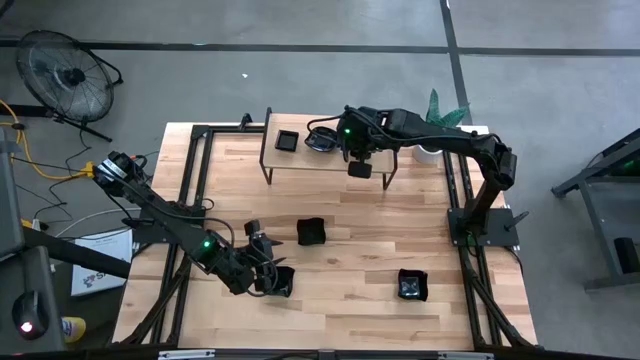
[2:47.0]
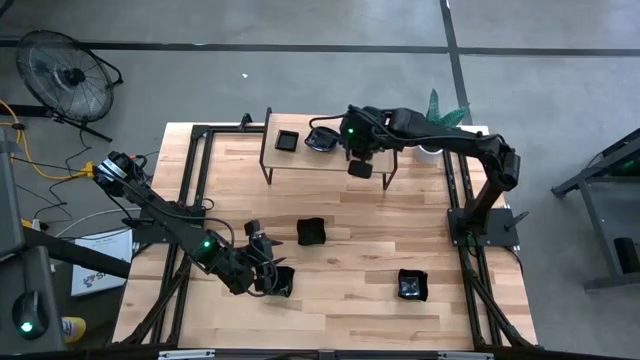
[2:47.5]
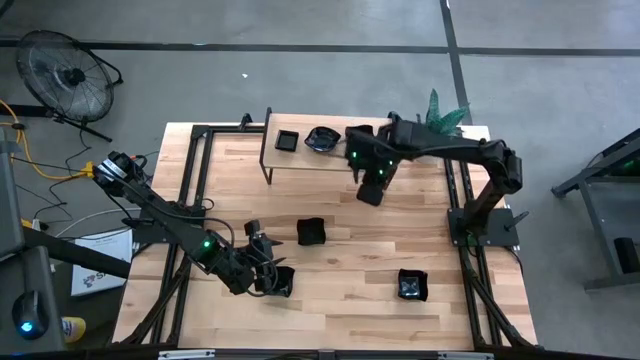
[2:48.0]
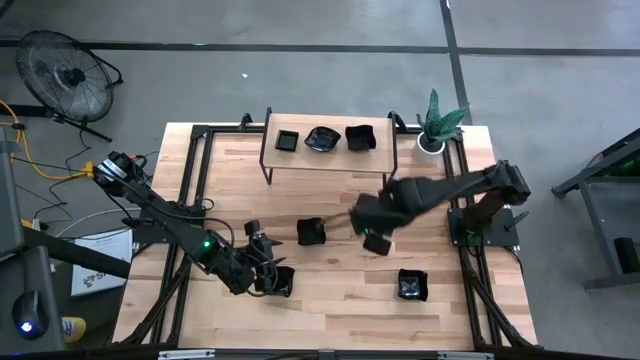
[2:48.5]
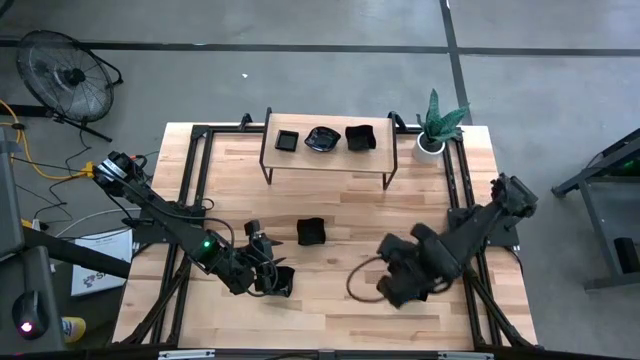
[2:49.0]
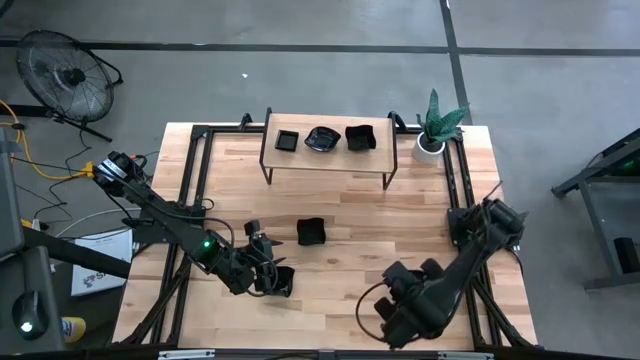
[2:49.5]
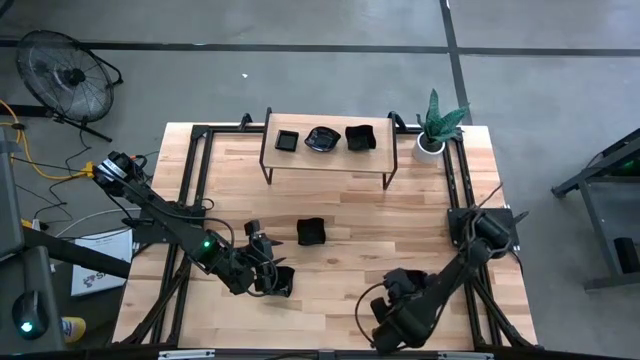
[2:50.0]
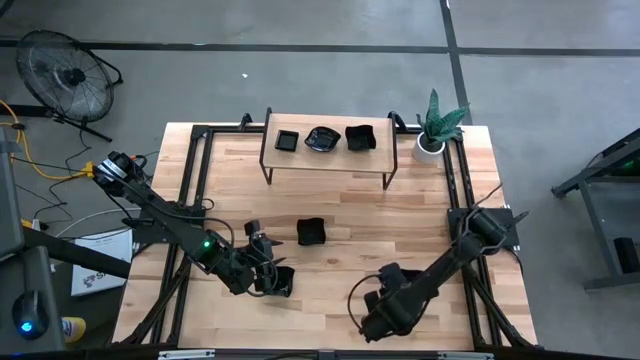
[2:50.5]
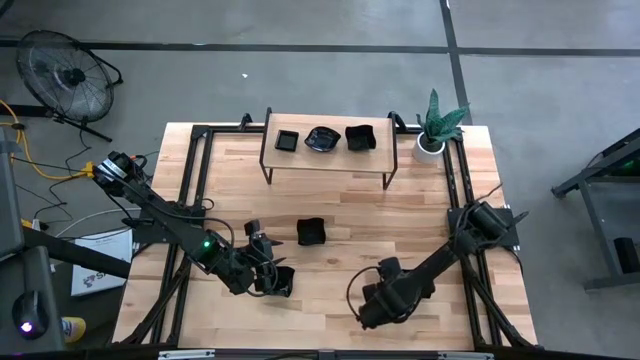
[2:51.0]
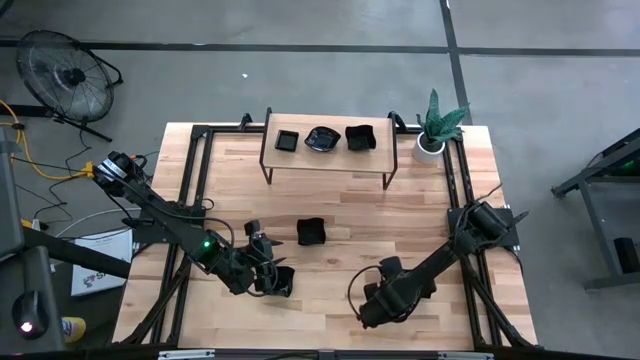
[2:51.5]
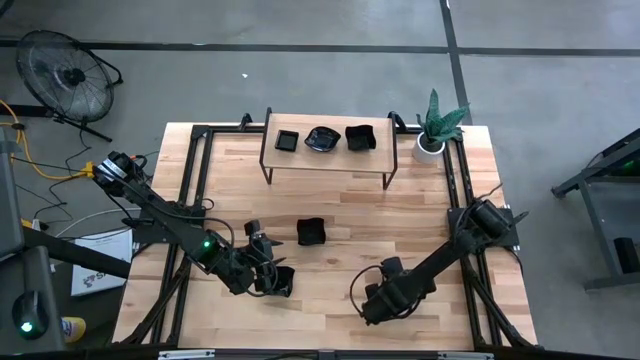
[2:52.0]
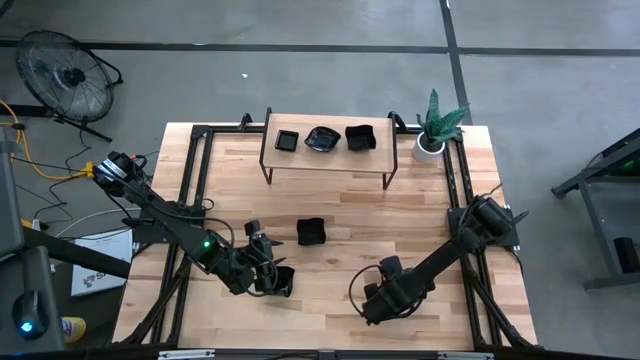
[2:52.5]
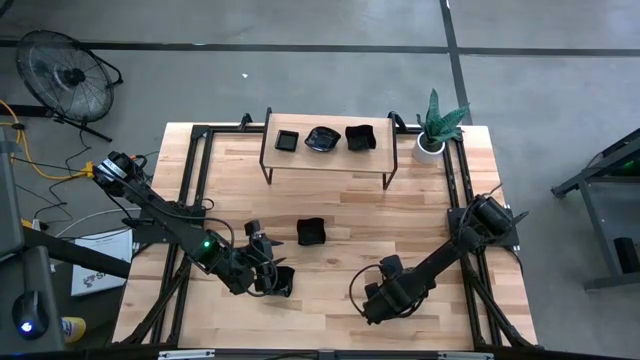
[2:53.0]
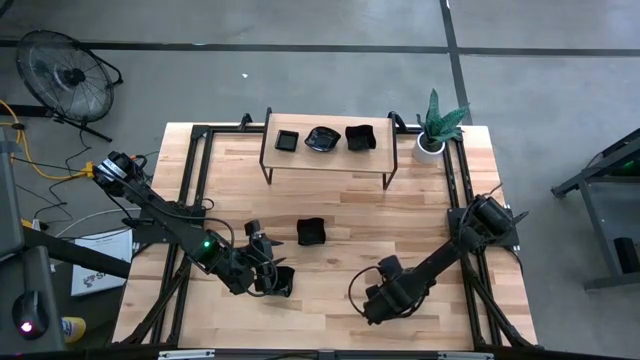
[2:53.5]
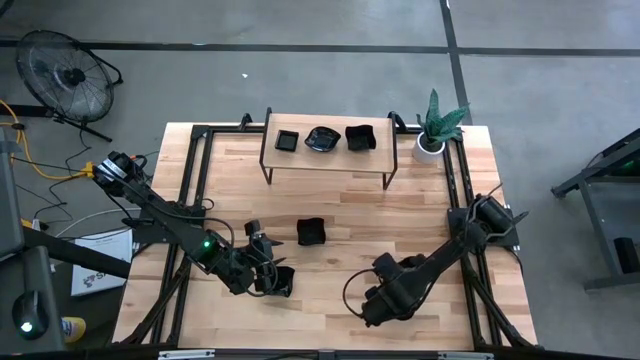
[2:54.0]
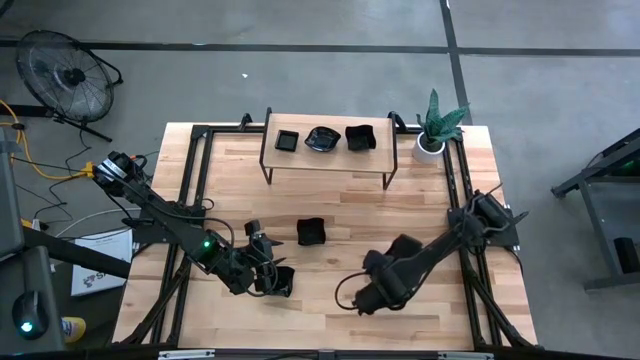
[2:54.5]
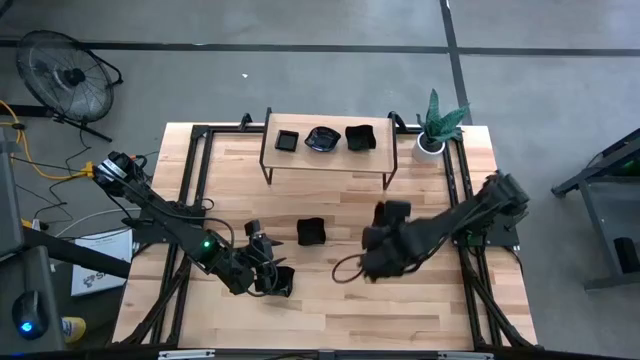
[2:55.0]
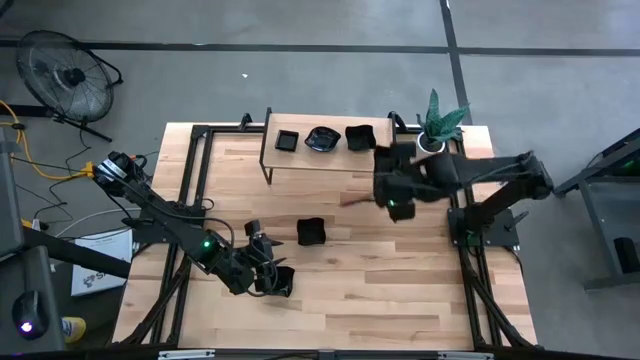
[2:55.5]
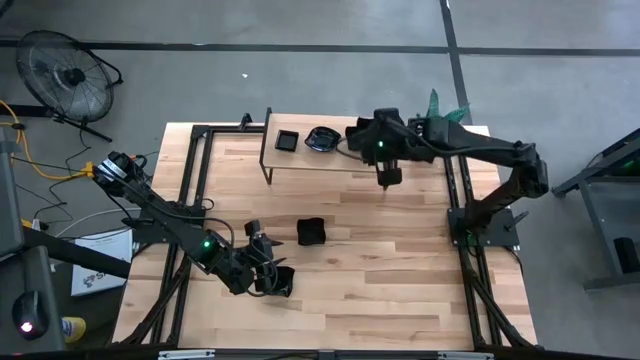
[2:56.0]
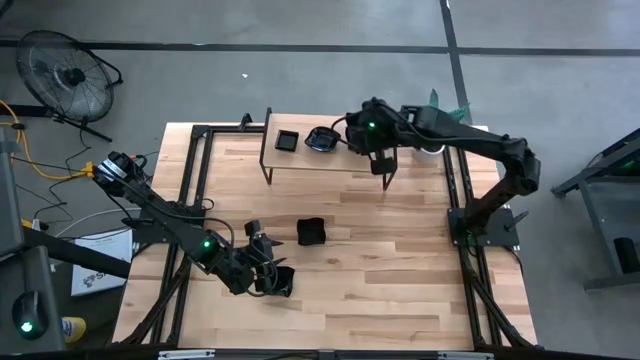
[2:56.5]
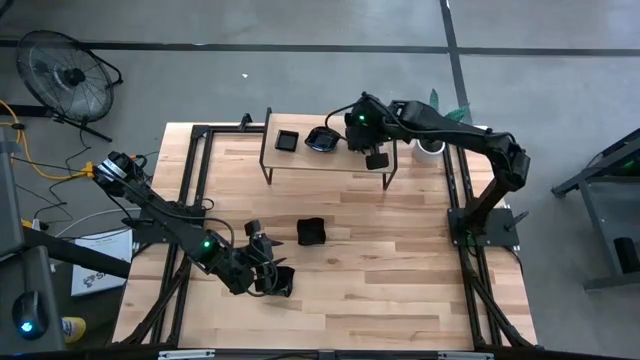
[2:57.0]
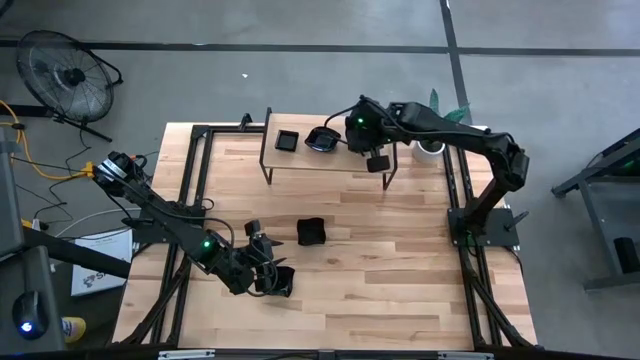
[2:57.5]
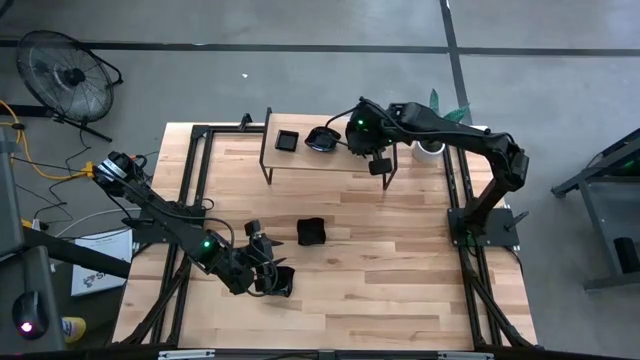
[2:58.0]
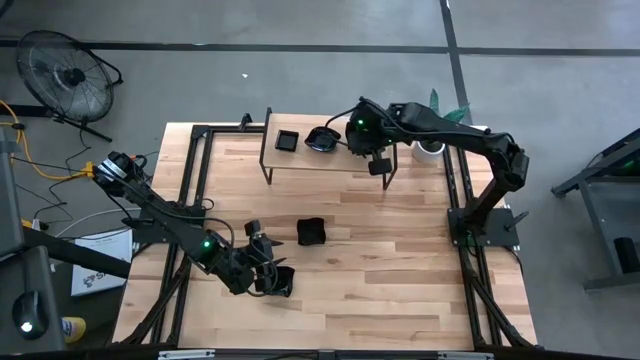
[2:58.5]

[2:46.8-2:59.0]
Task: Pick & Place Mini shaped plates
Stack the black distorted square plate on top of the stacked black distorted square plates on the shelf

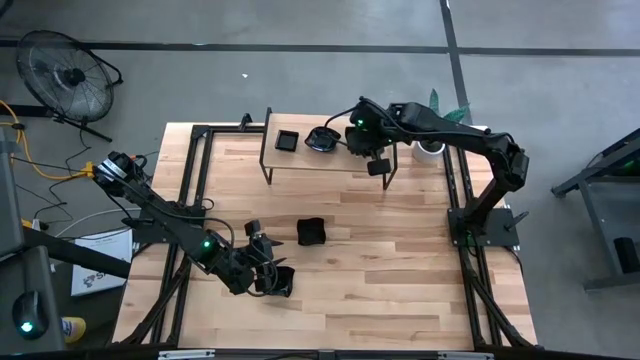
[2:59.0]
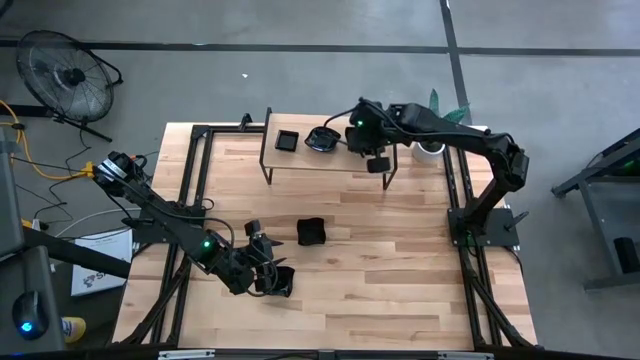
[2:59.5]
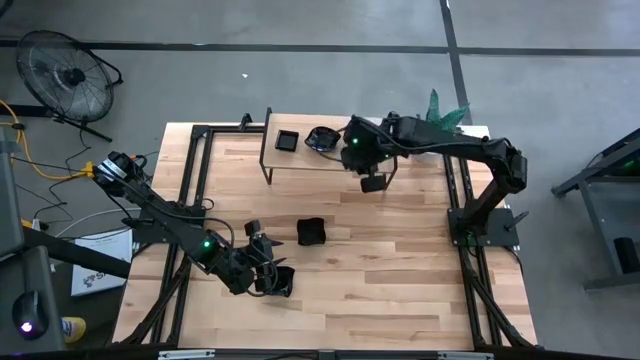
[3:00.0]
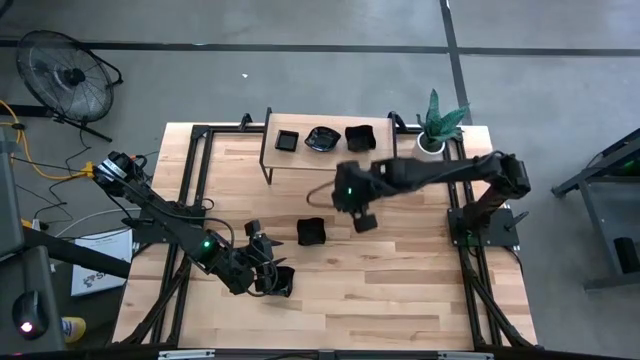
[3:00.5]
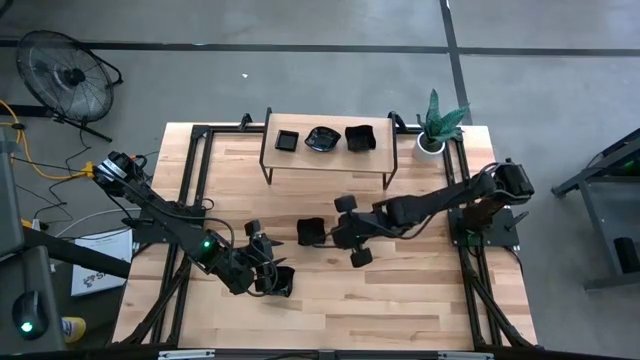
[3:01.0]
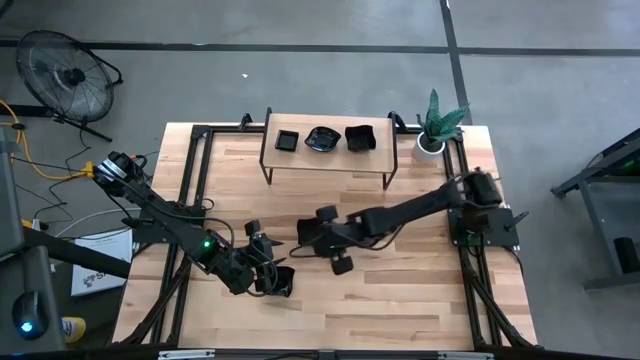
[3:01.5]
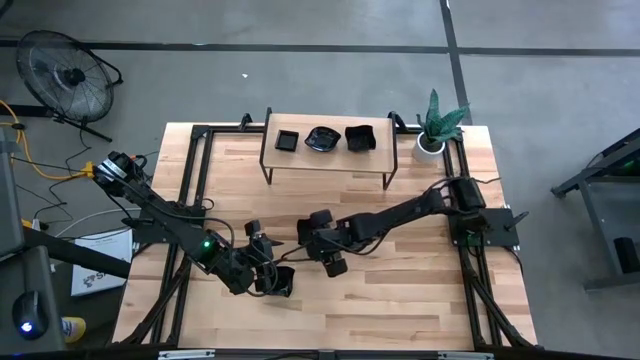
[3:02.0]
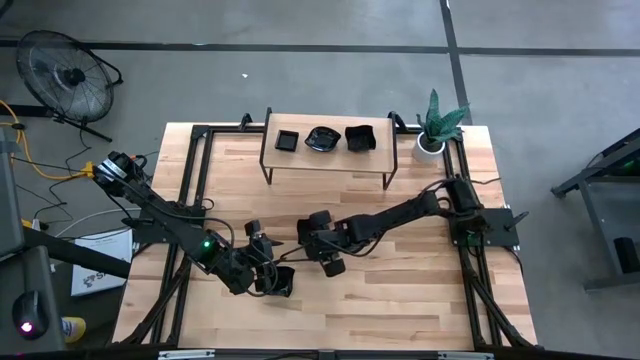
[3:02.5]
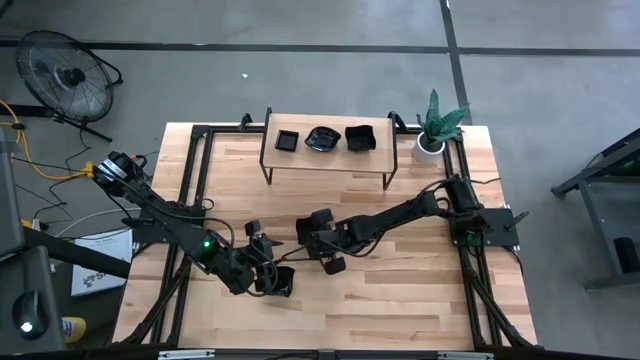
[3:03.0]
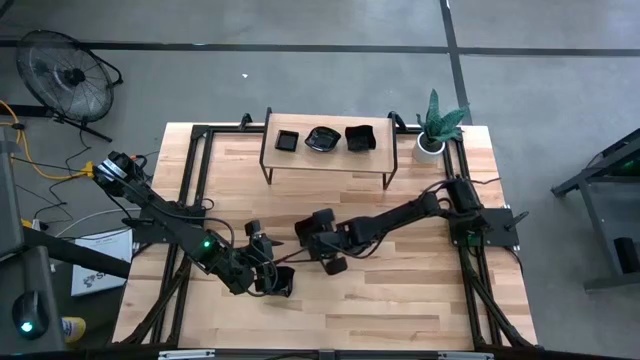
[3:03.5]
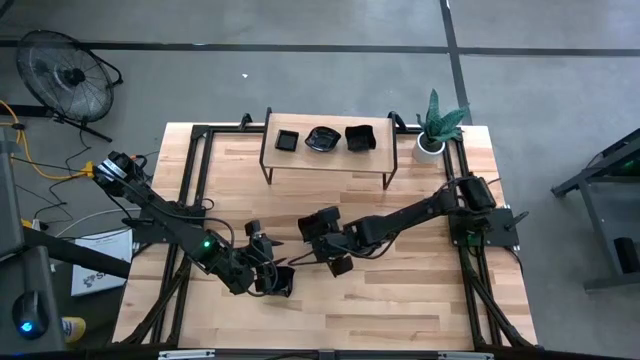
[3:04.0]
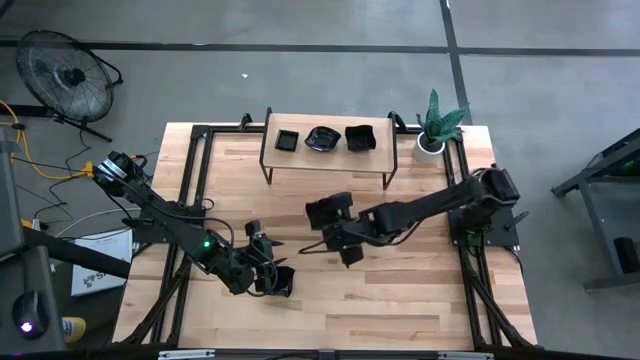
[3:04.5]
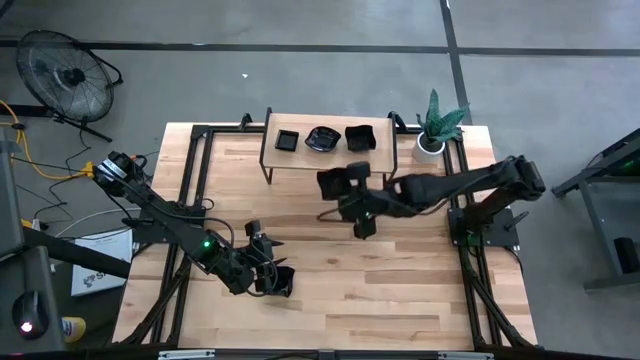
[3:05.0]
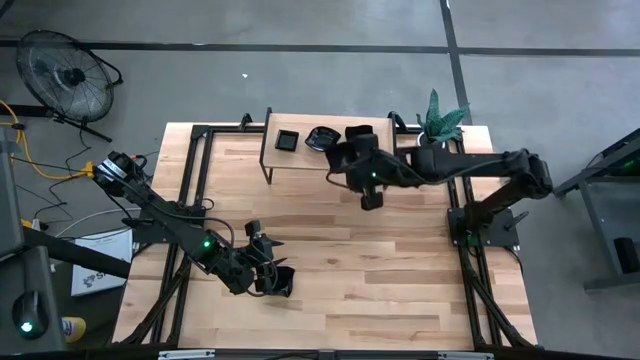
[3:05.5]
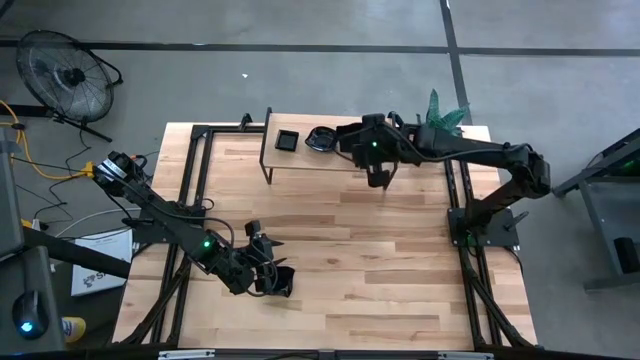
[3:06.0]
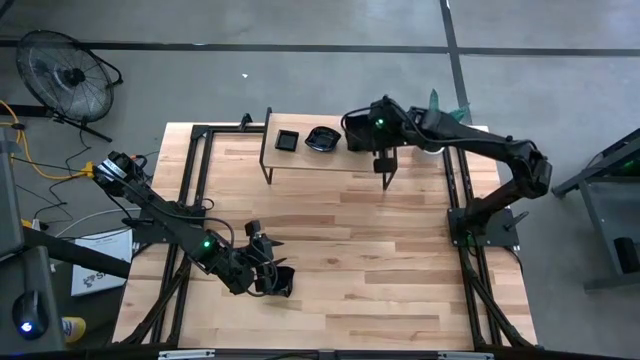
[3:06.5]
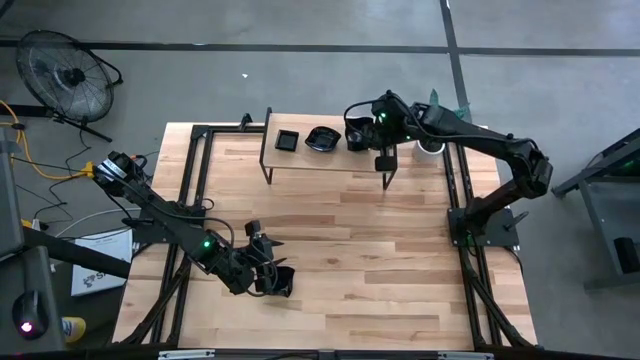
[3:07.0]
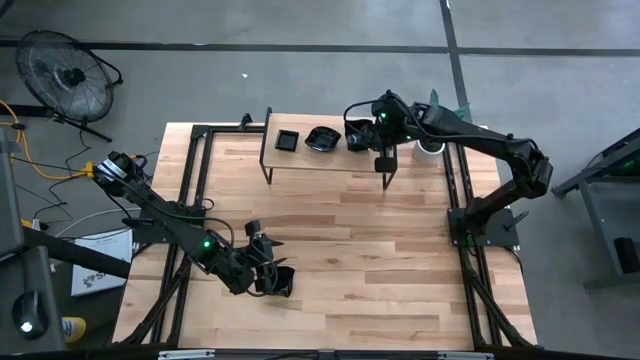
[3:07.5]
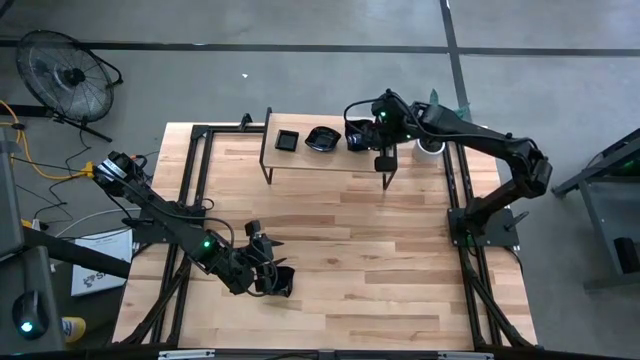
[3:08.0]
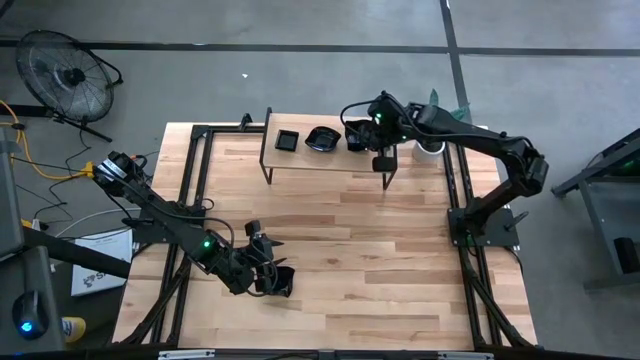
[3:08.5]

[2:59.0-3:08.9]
Stack the black distorted square plate on top of the stacked black distorted square plates on the shelf
